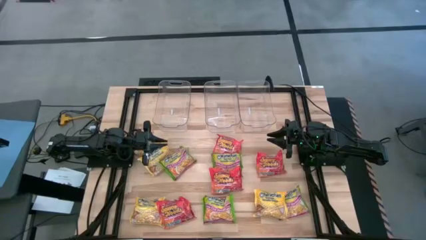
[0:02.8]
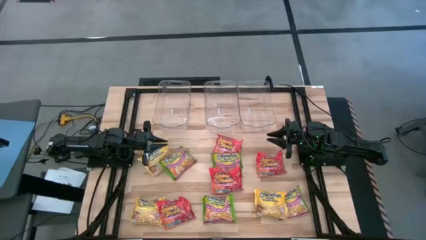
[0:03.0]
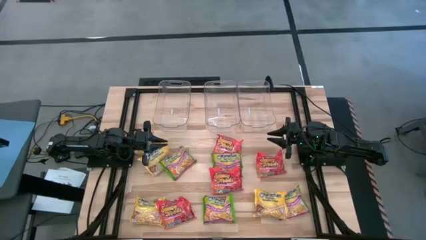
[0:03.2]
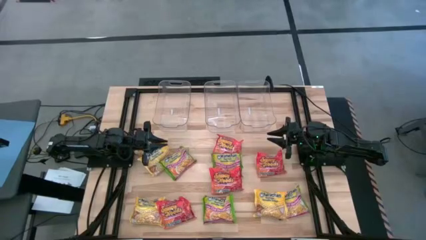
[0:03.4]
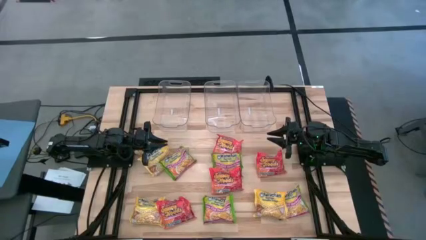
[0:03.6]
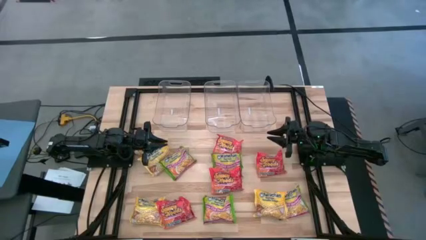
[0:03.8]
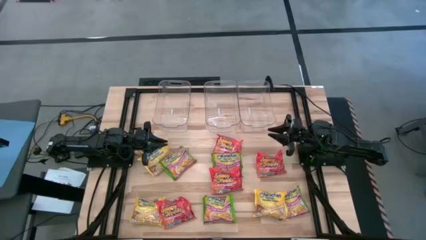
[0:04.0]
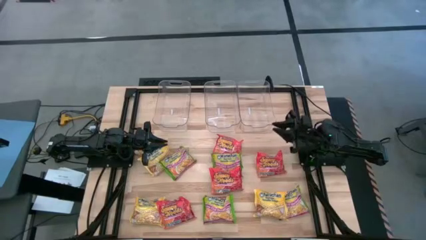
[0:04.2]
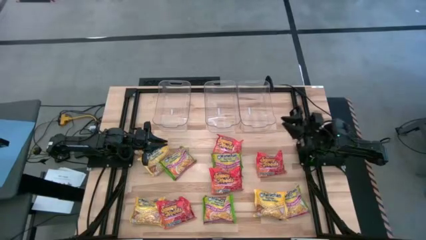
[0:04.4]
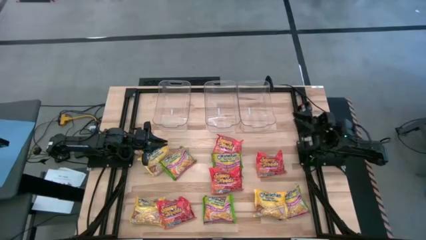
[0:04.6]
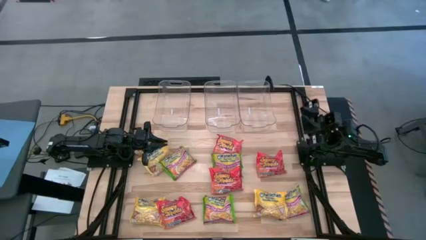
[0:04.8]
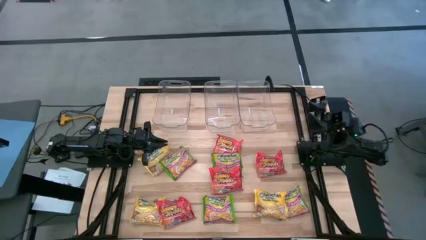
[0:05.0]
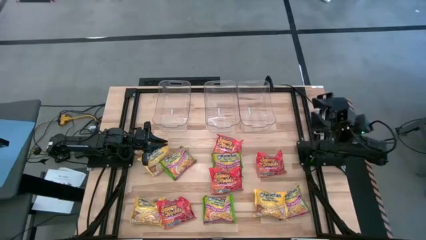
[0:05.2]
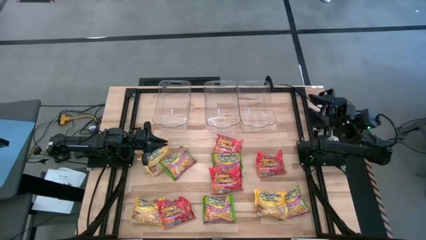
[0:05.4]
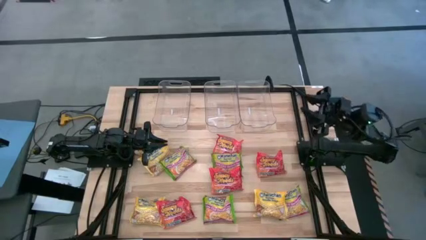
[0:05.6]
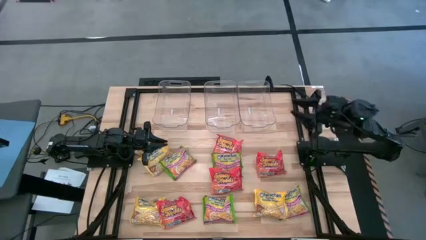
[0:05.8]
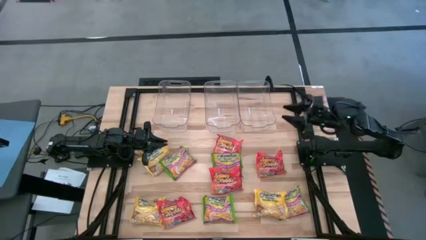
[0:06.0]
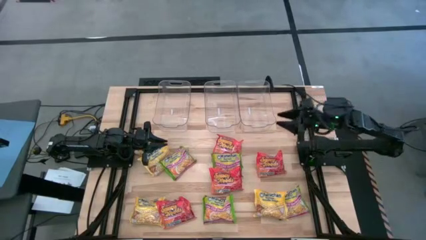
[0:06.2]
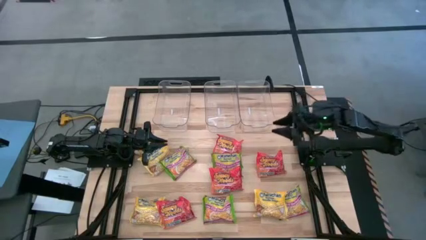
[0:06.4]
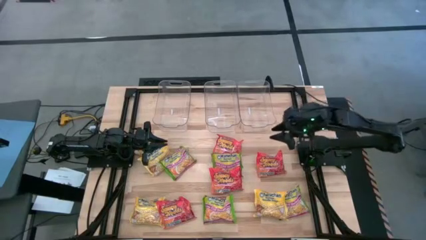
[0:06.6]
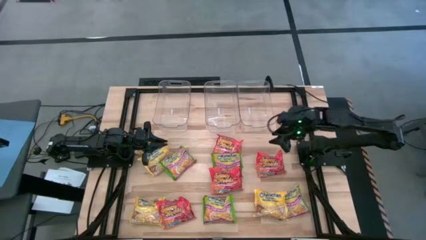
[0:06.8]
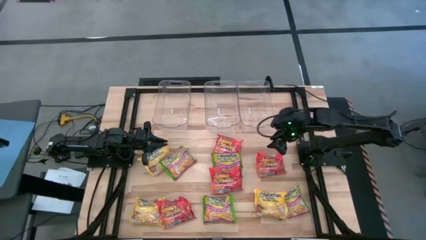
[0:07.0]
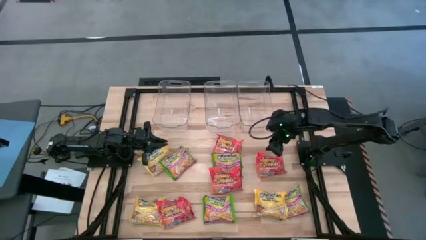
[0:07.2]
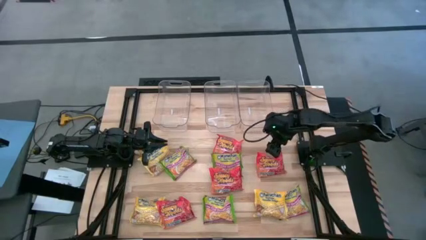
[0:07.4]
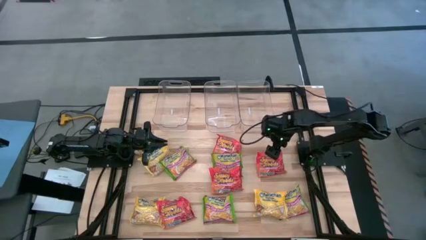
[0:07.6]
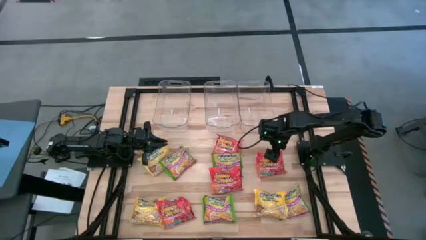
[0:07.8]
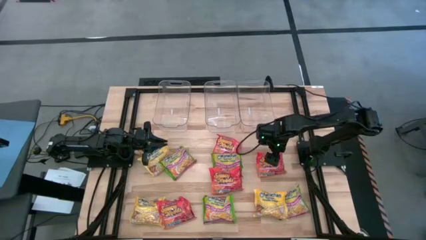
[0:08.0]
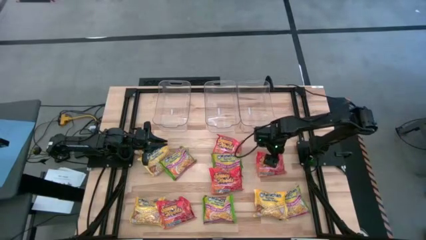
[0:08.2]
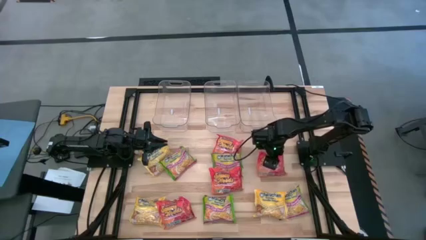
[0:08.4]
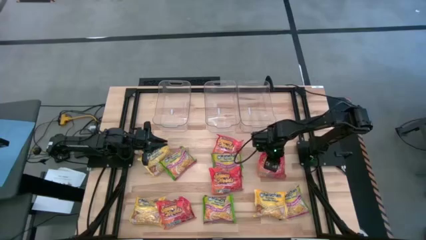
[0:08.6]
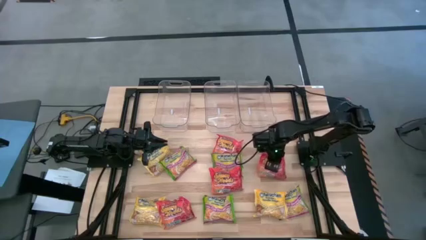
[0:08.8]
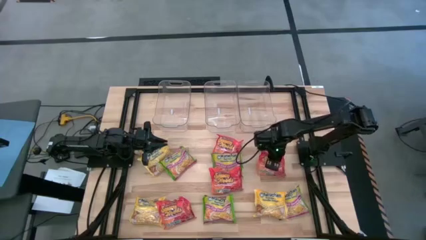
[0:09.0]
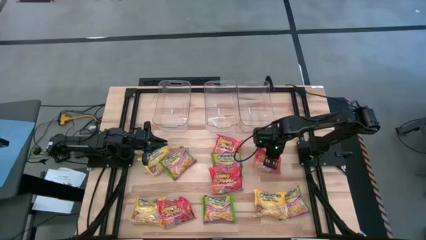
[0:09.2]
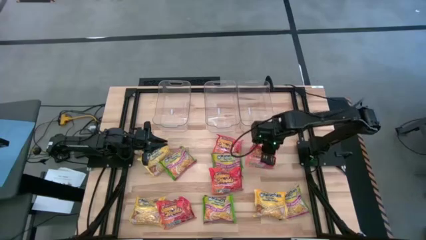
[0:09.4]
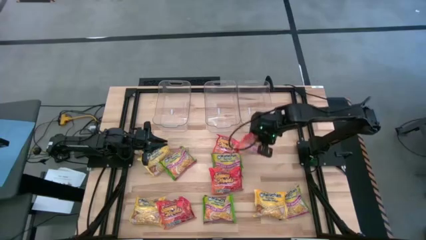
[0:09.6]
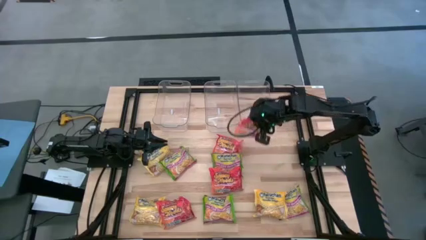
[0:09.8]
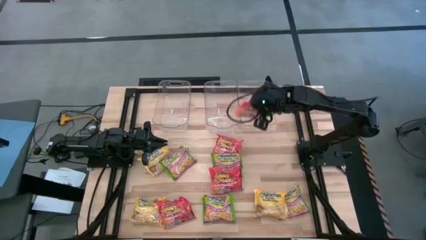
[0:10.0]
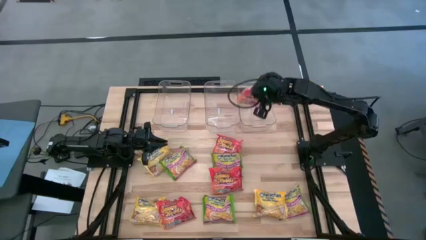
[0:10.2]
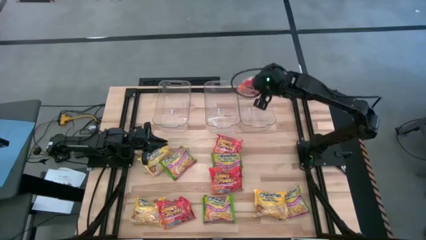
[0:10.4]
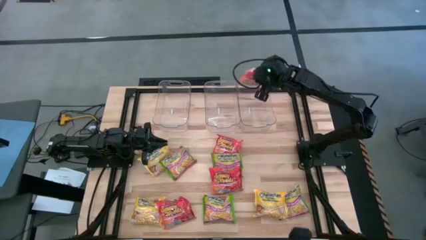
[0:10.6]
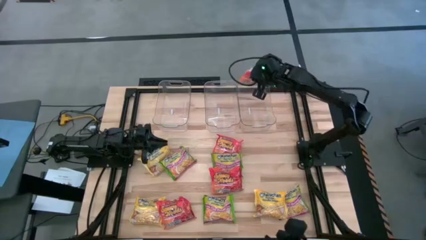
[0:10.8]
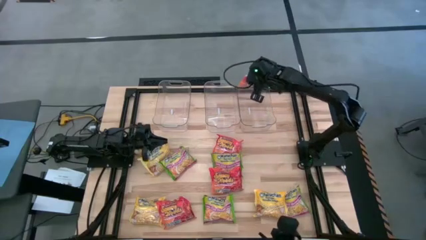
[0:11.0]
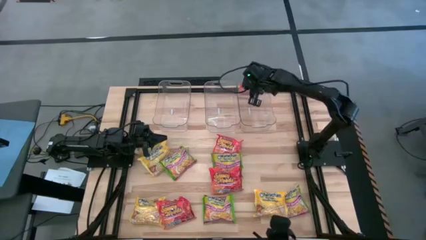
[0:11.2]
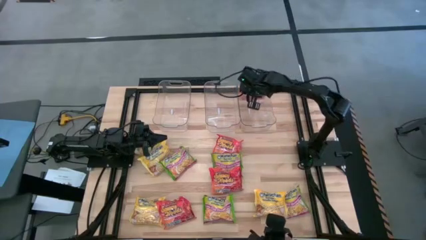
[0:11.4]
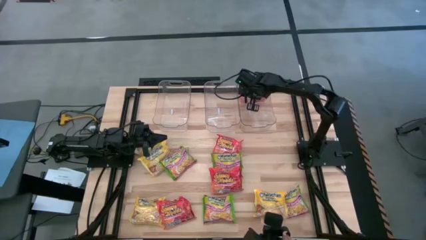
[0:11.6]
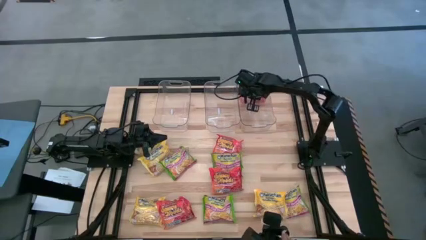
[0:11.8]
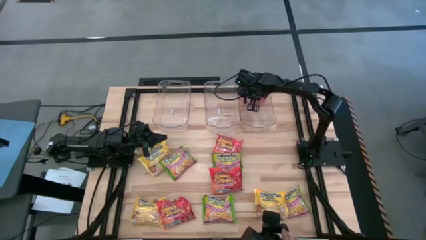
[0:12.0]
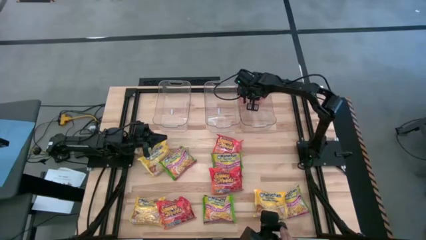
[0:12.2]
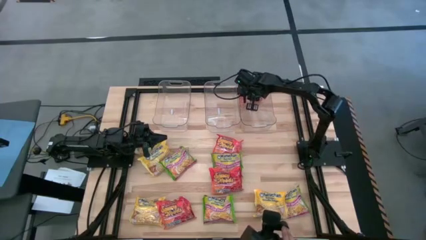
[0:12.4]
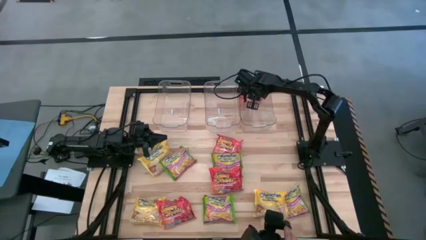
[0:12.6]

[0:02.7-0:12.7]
Task: Sort Maruchan noodles
Put the red noodle pack into the right transparent bin

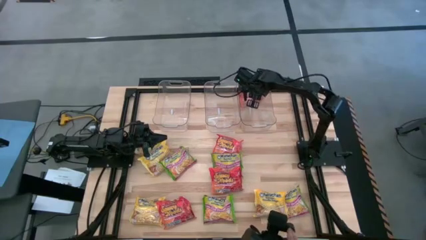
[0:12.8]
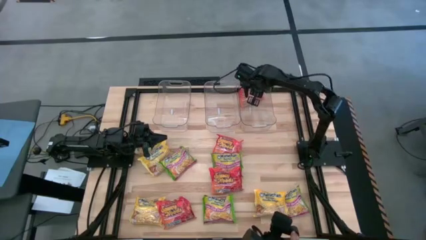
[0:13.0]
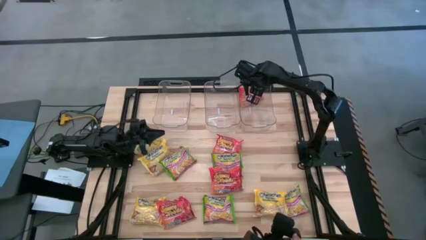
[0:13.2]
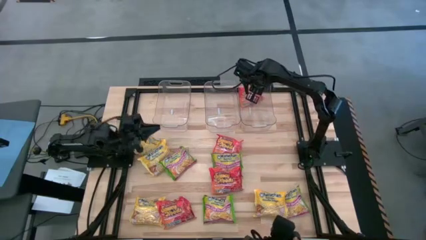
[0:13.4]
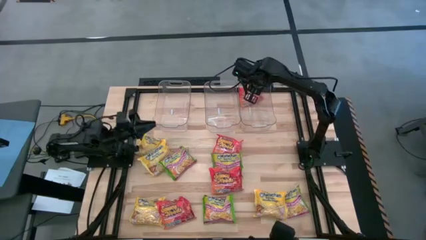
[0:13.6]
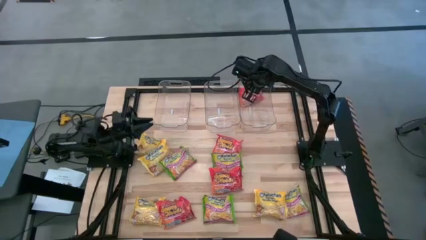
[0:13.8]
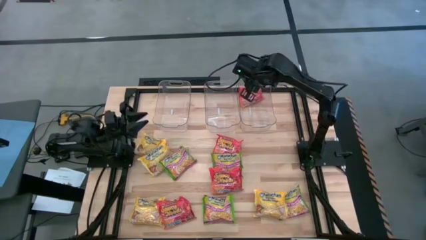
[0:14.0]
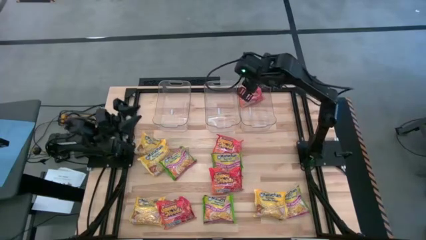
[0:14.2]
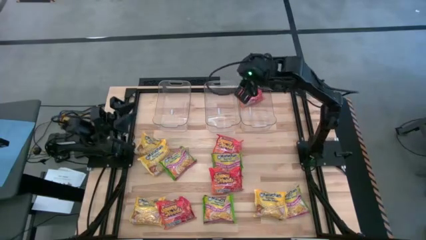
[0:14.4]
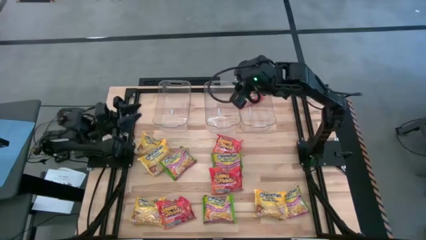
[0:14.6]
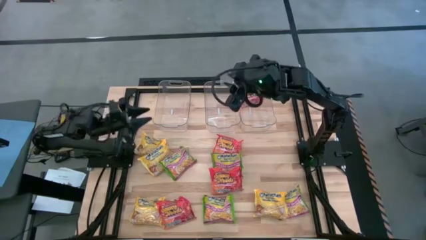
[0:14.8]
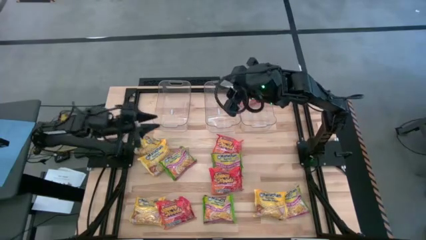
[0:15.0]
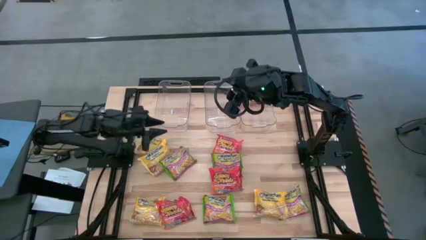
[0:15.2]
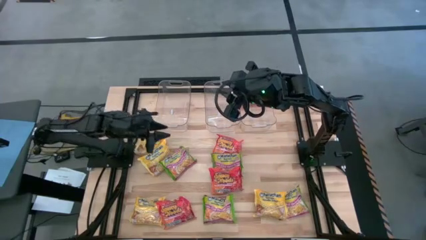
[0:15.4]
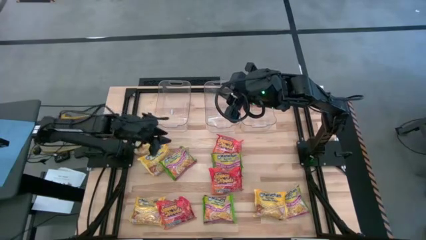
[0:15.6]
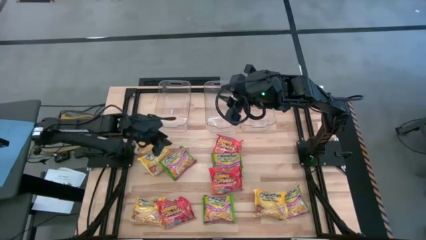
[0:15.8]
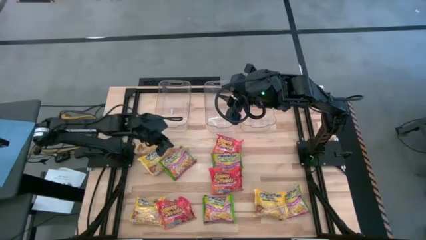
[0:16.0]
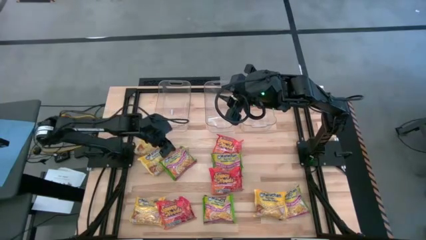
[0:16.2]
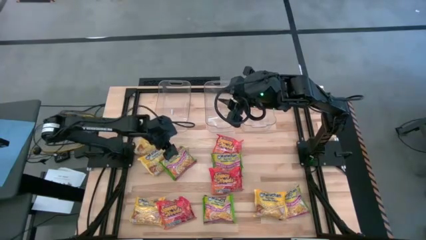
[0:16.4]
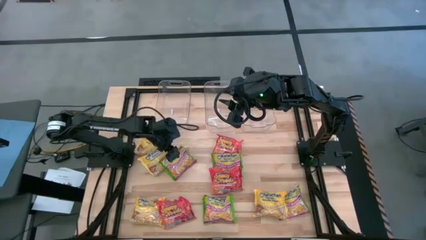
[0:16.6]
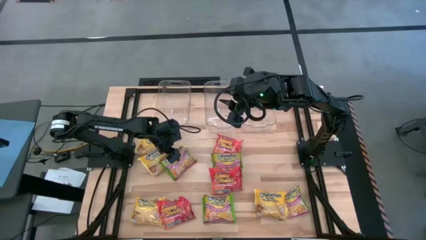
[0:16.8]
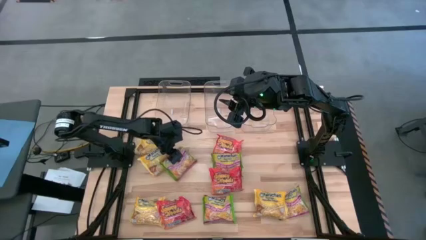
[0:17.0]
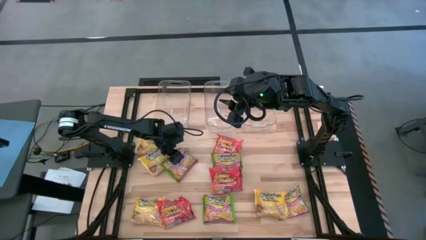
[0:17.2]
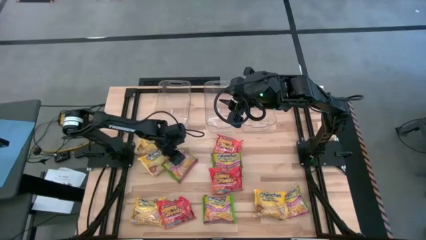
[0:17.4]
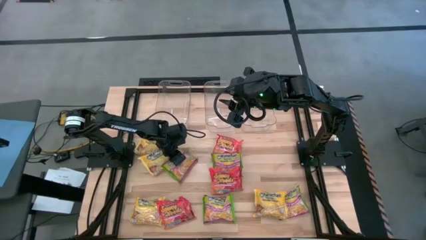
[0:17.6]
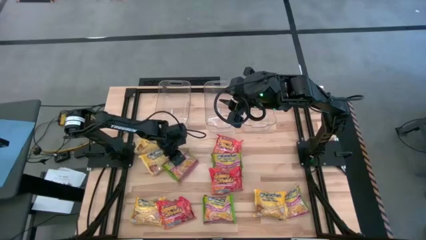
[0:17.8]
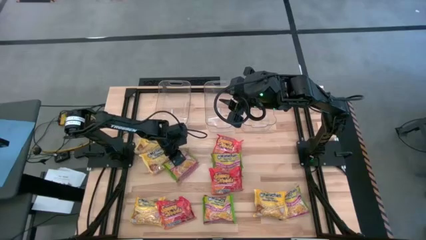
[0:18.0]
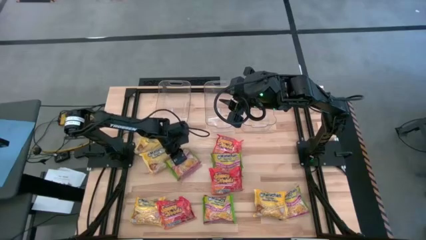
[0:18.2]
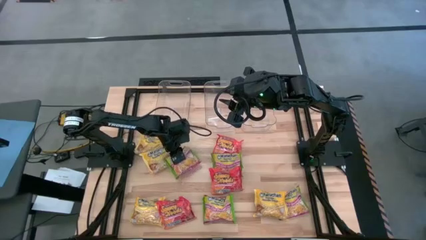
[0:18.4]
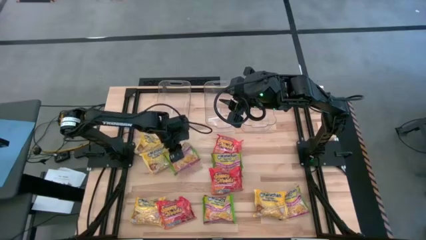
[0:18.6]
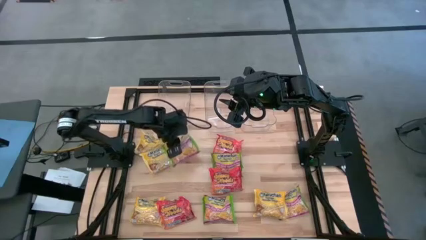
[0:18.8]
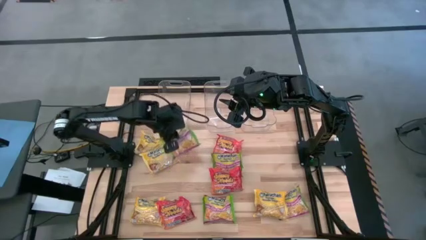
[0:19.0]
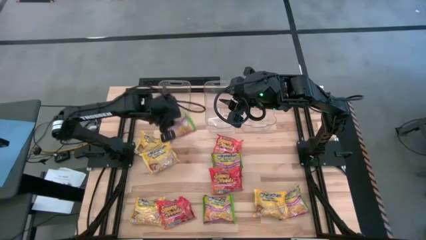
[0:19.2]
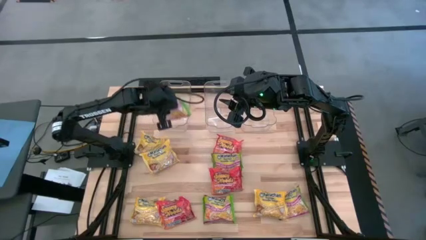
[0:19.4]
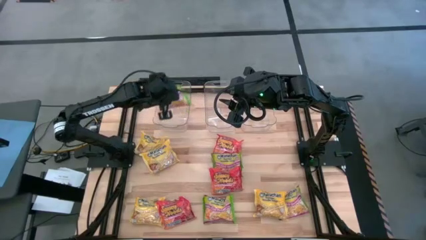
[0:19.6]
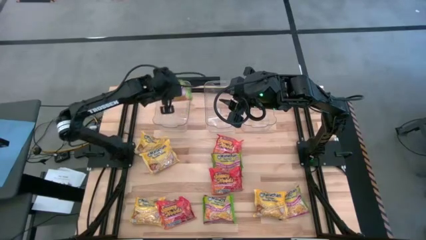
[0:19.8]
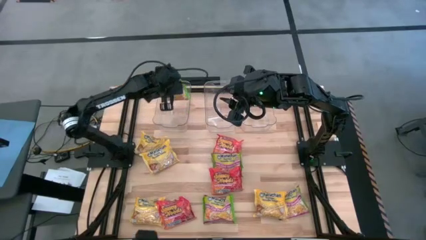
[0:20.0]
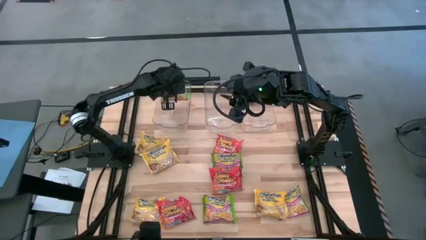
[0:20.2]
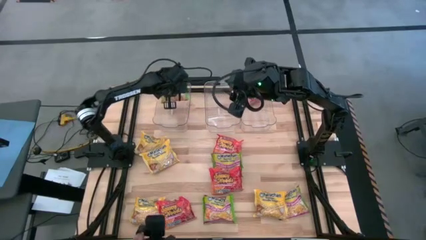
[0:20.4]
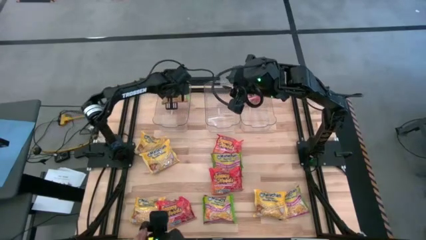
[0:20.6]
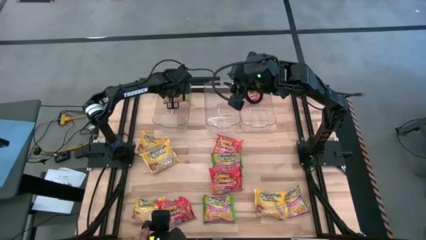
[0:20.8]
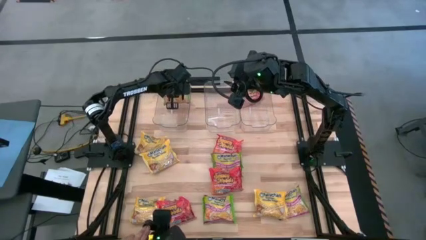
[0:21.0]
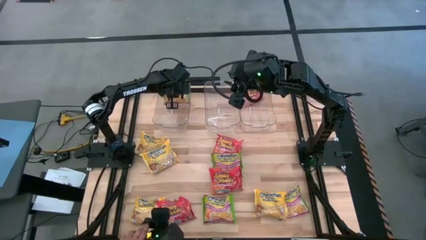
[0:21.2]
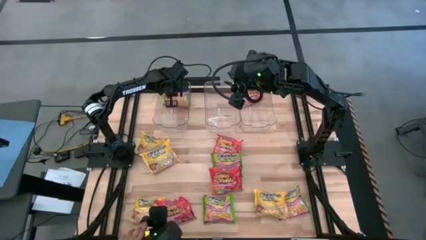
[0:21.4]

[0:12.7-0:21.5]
Put the green noodle pack into the left transparent bin
